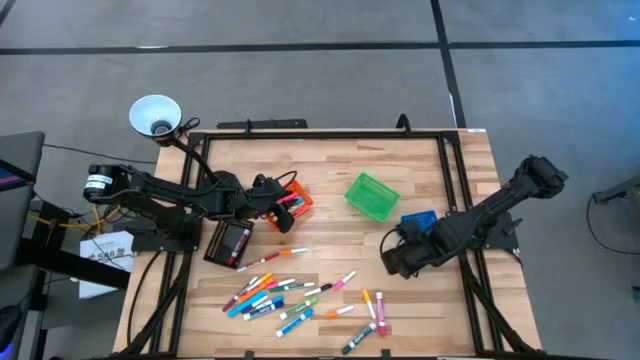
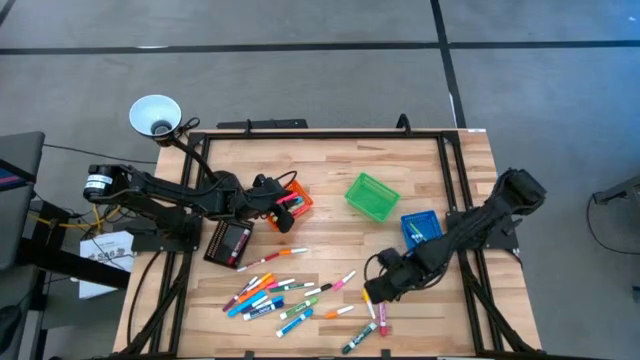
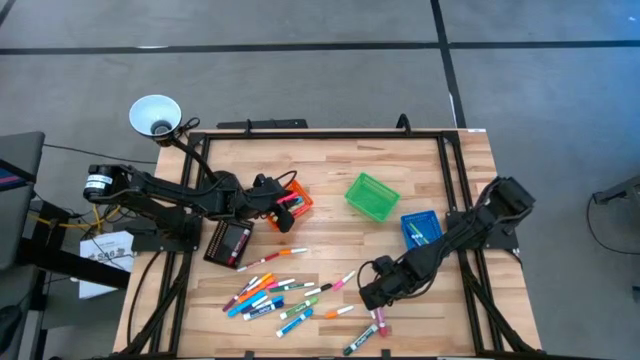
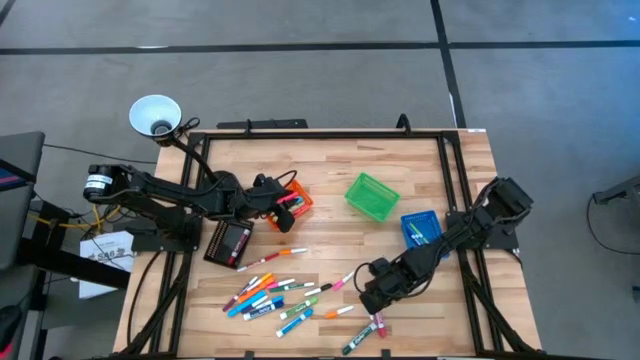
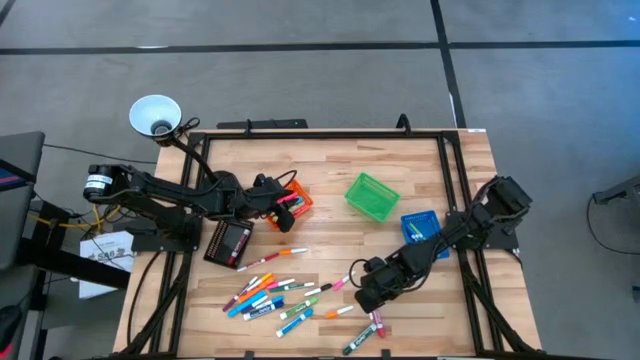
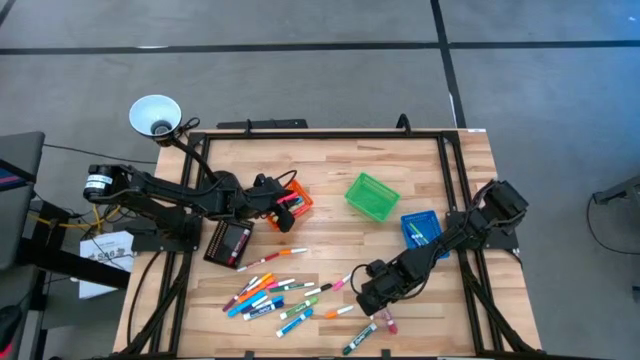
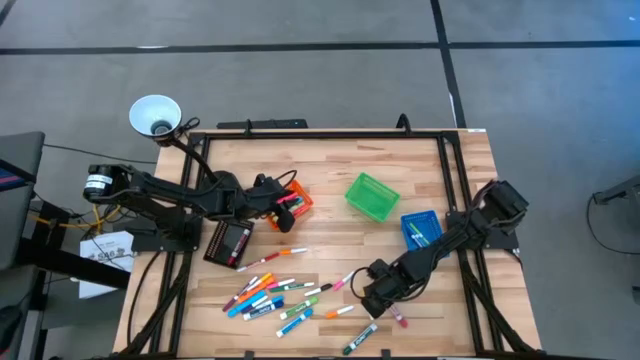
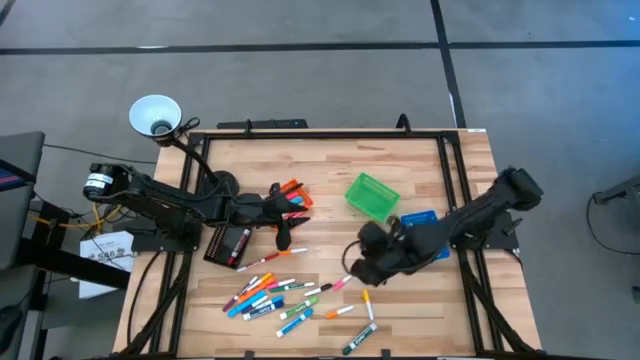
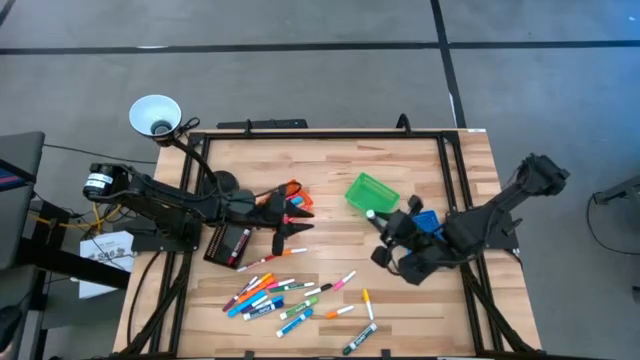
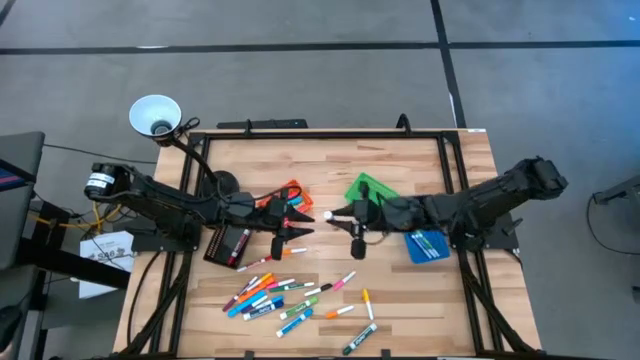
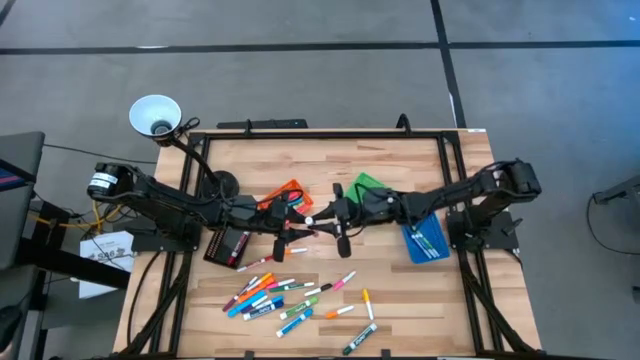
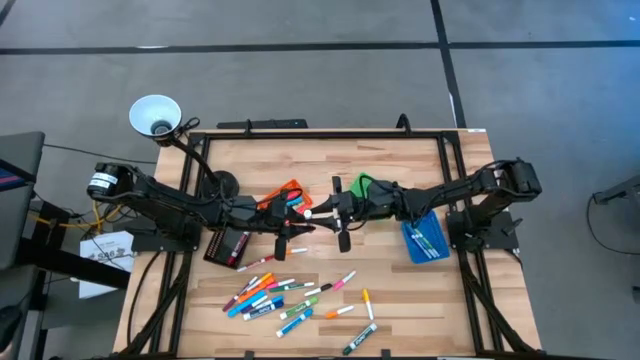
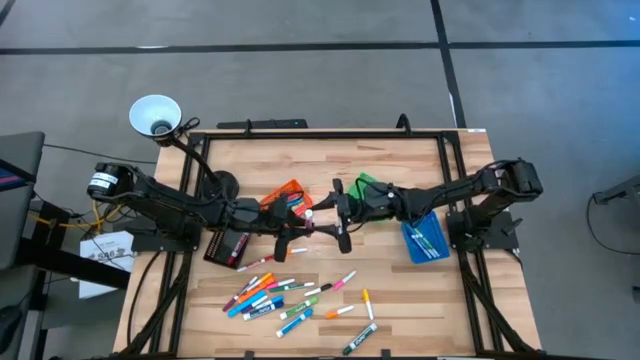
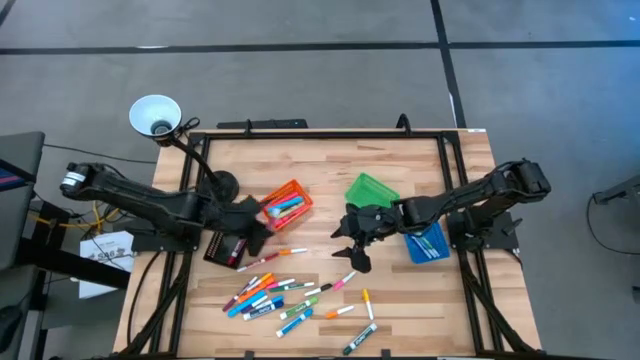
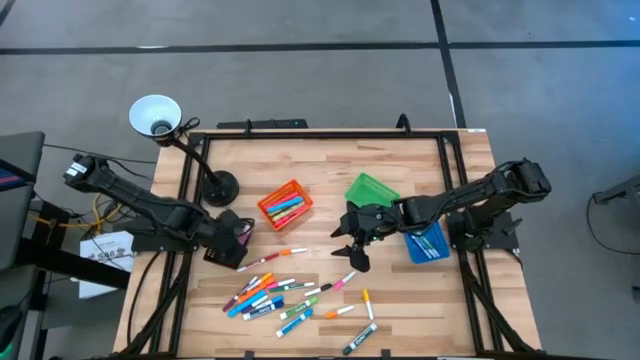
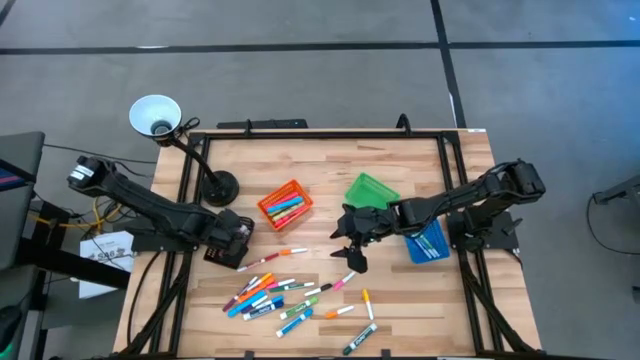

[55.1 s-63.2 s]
Task: Pick & Place Markers
Put the pink marker pen into the black bin

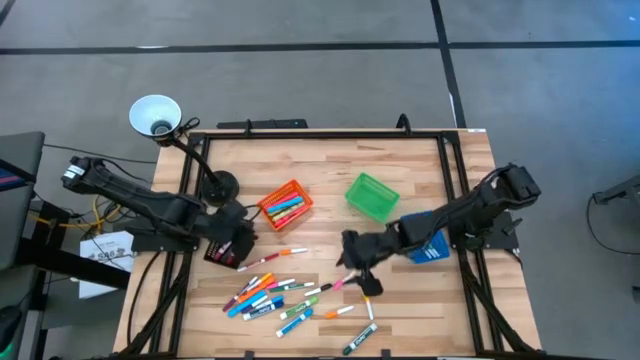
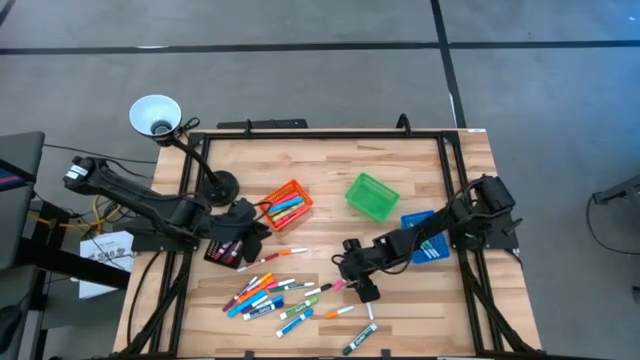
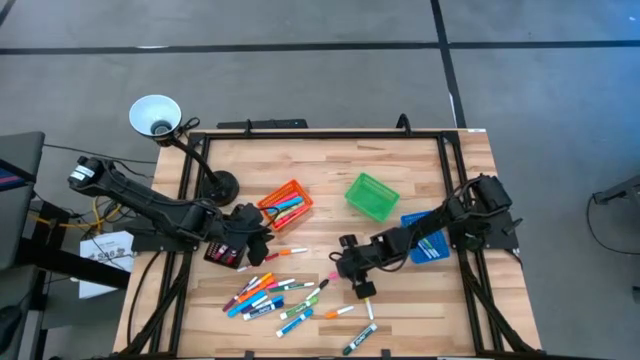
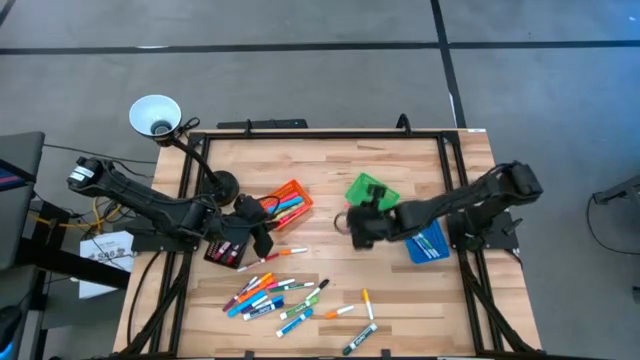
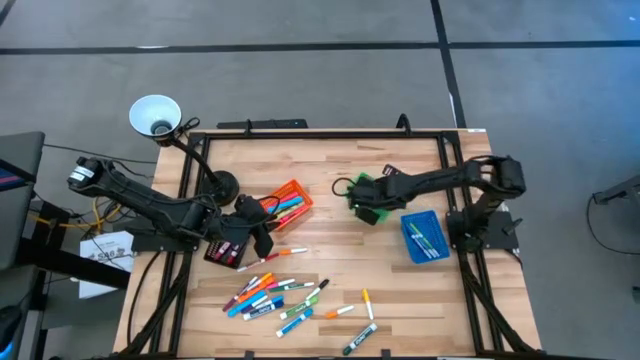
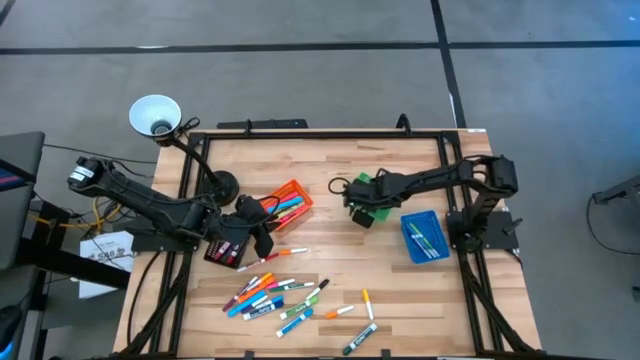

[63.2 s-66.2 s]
Put the right pink pen into the green bin

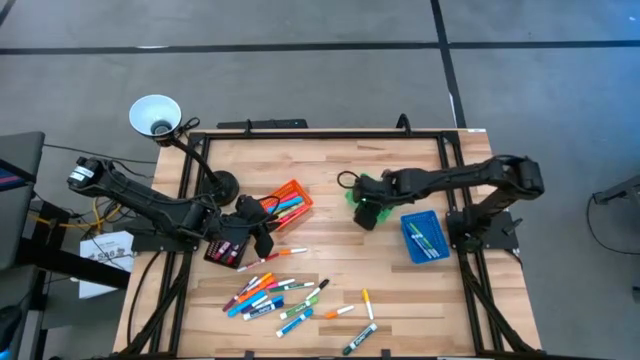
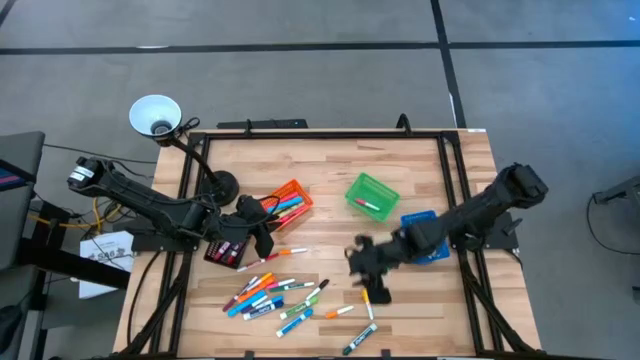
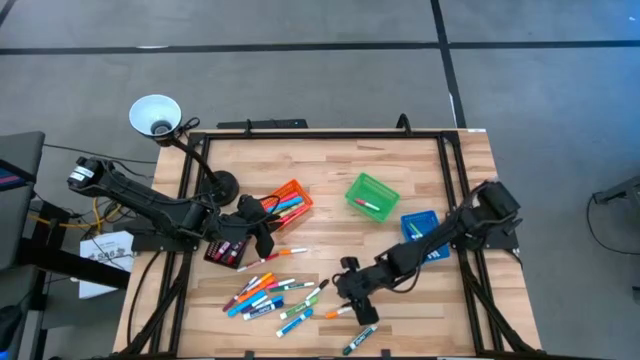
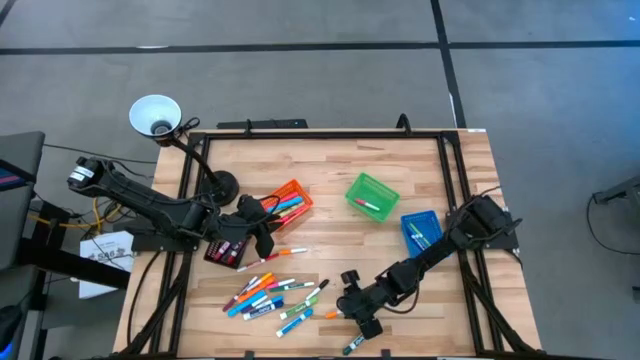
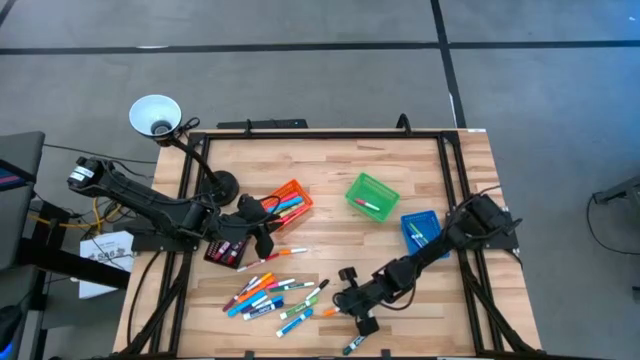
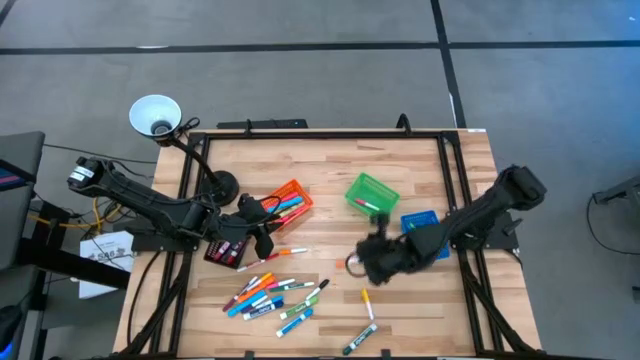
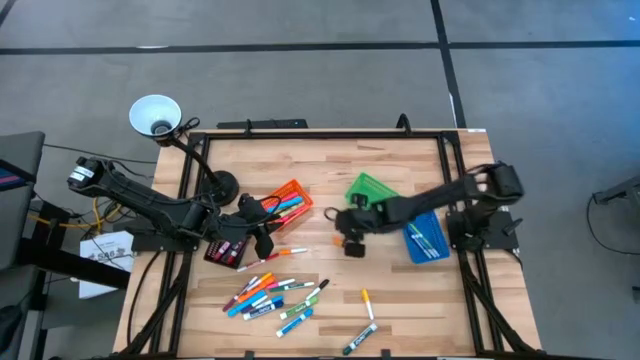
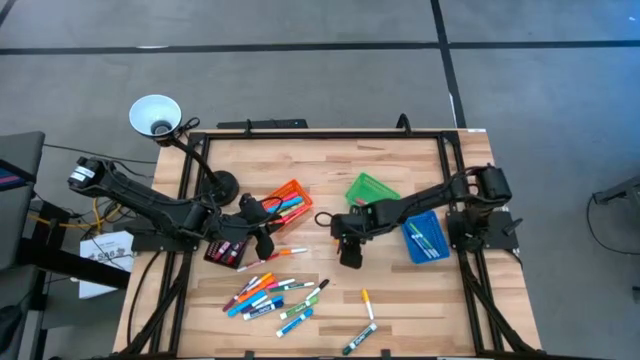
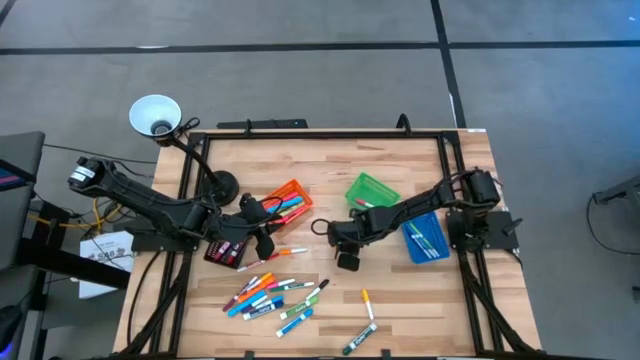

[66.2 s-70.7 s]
Put the bottom orange pen into the green bin

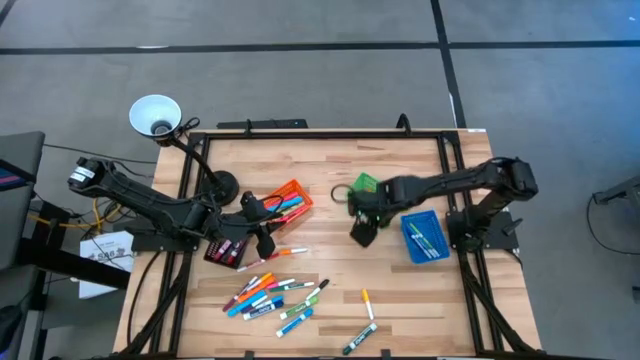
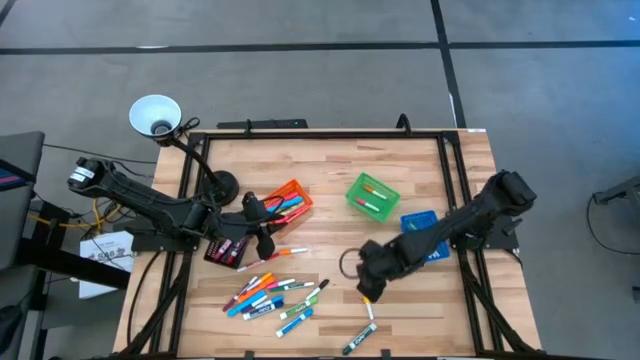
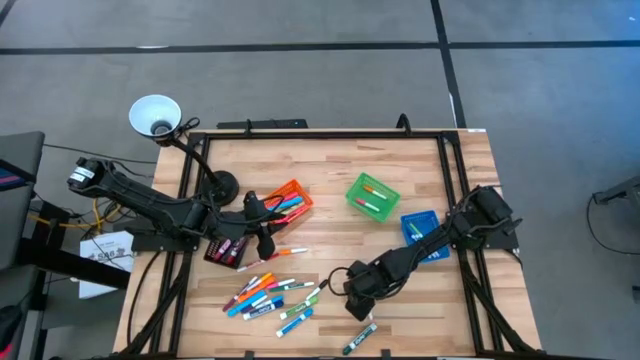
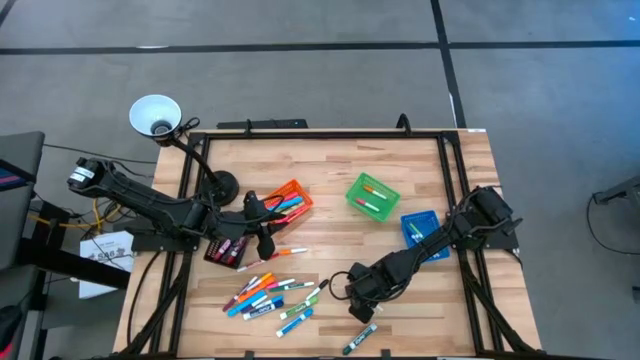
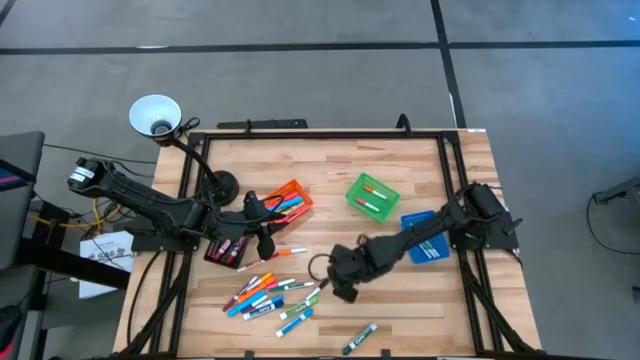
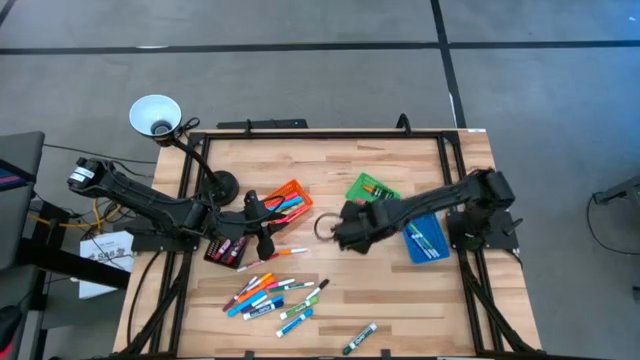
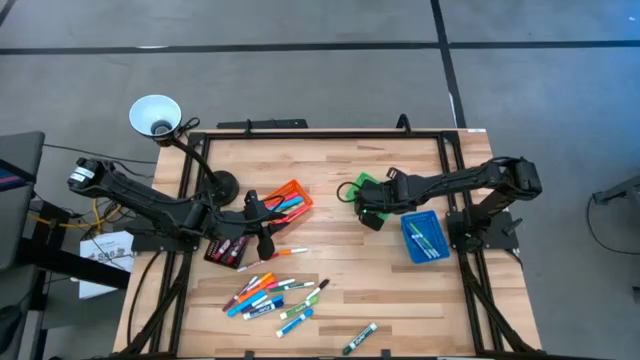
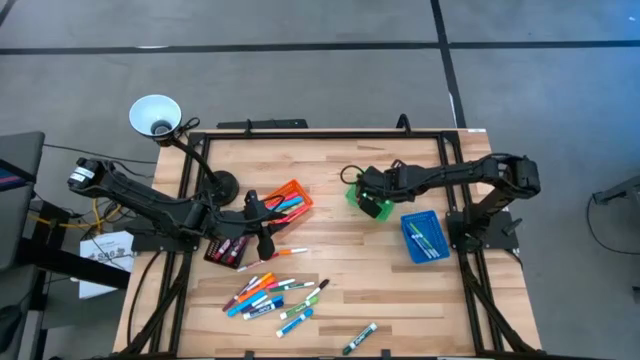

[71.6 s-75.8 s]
Put the right yellow pen into the green bin

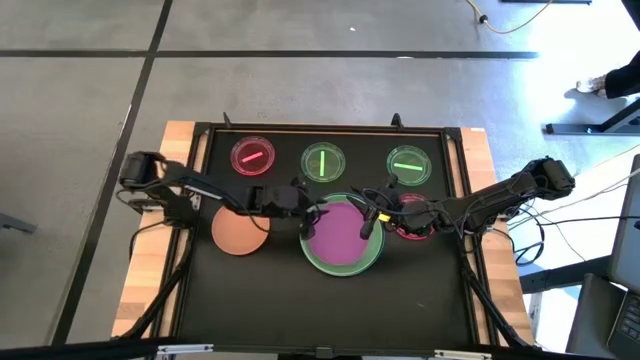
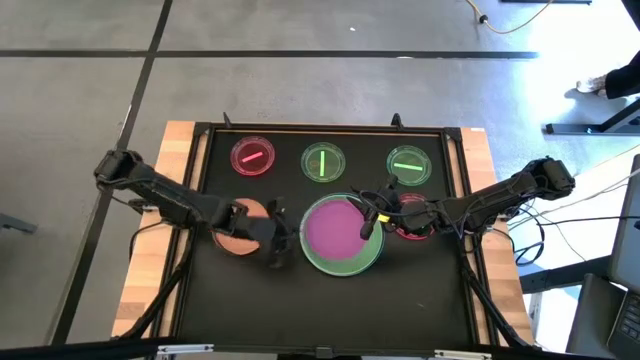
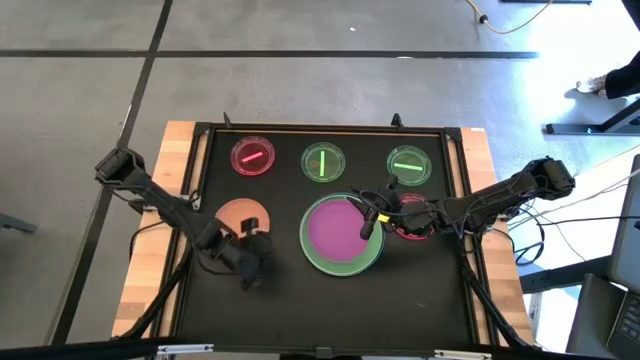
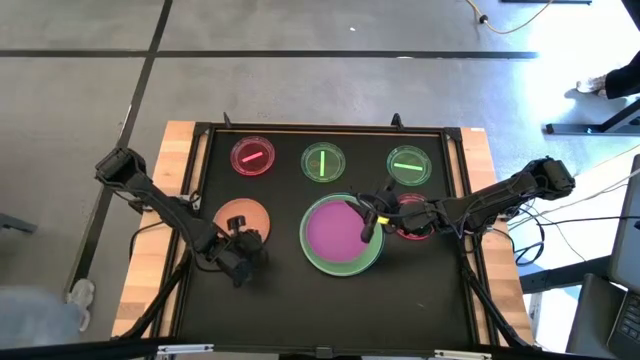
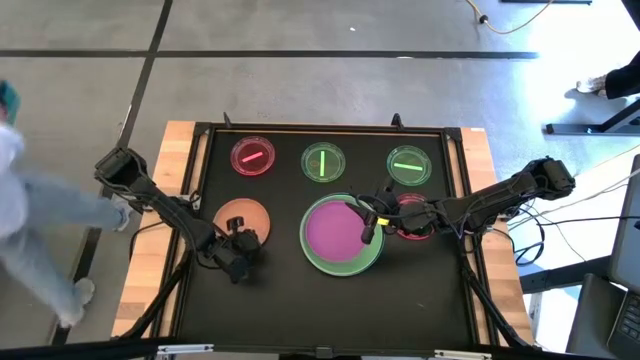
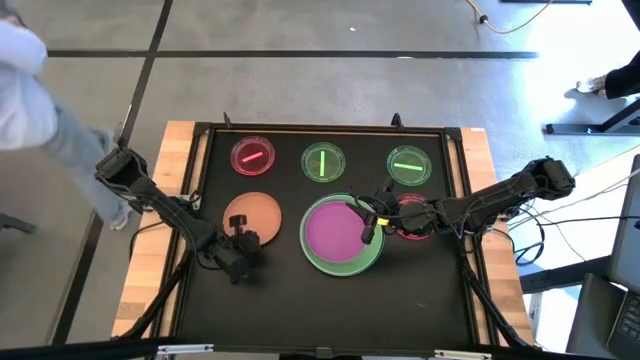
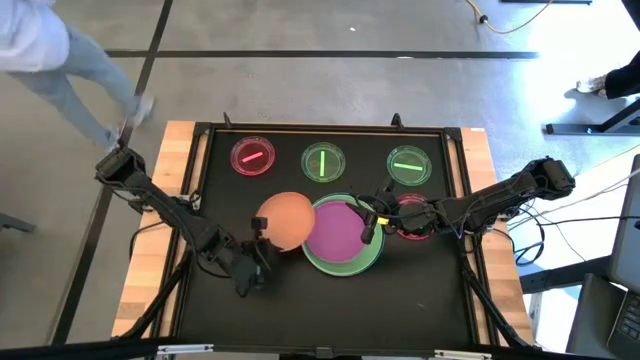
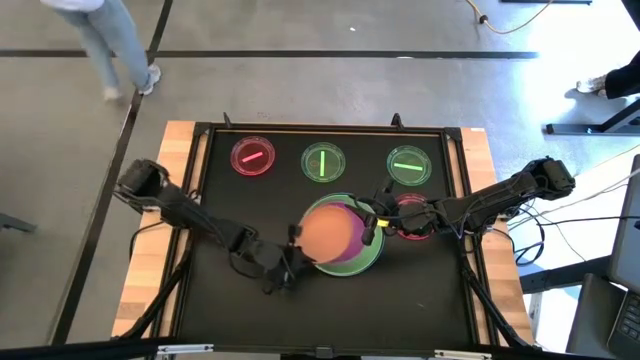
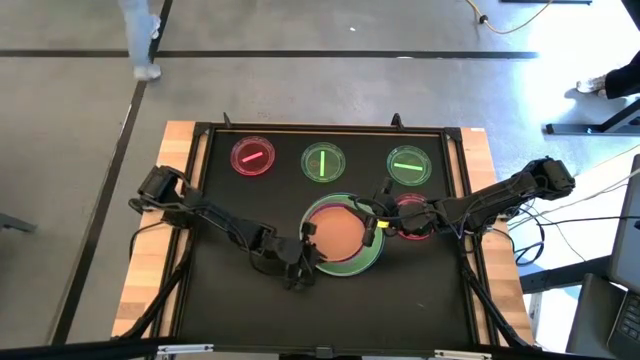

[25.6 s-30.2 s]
Task: Stack plastic plates
Stack the orange plate on the pink plate
